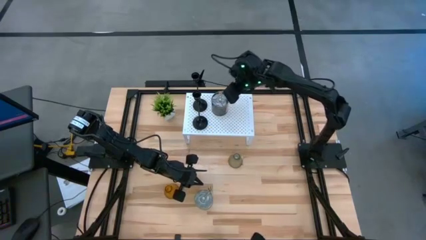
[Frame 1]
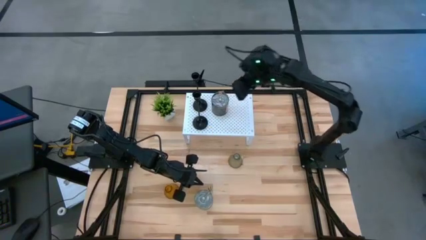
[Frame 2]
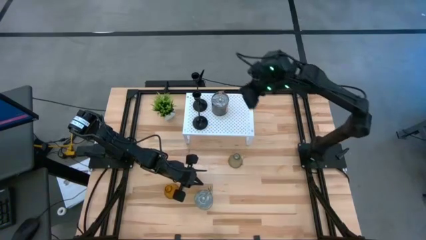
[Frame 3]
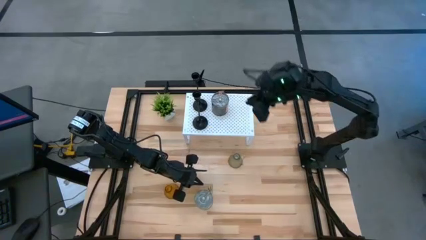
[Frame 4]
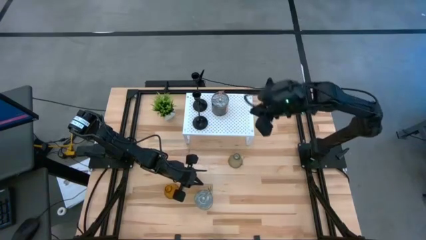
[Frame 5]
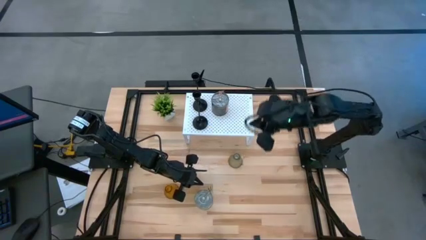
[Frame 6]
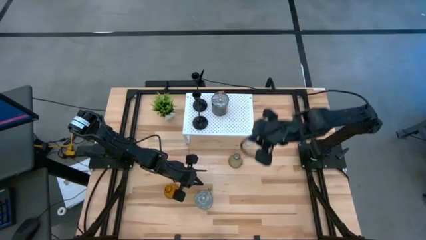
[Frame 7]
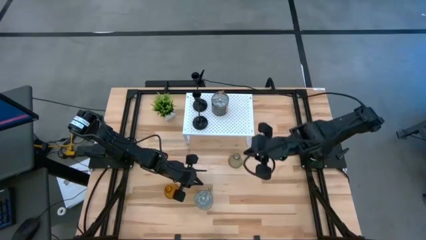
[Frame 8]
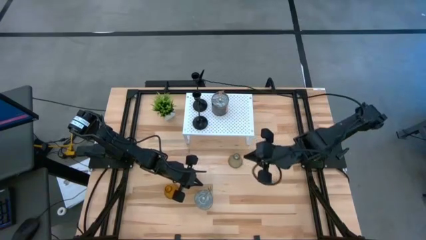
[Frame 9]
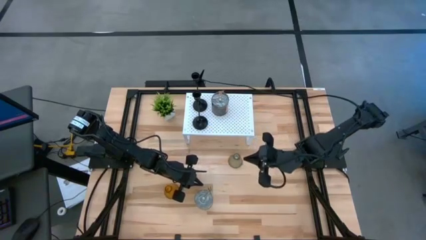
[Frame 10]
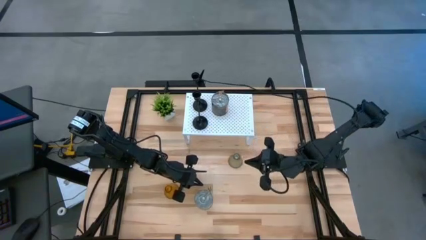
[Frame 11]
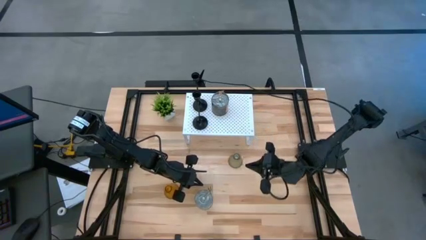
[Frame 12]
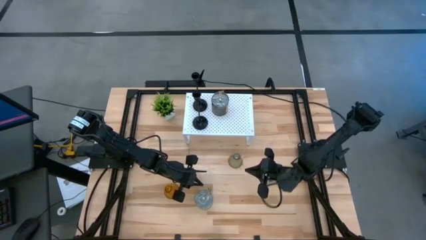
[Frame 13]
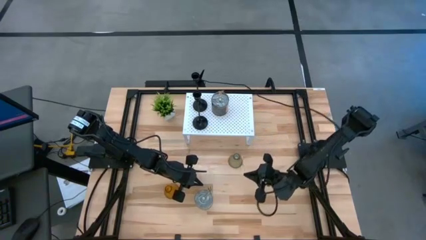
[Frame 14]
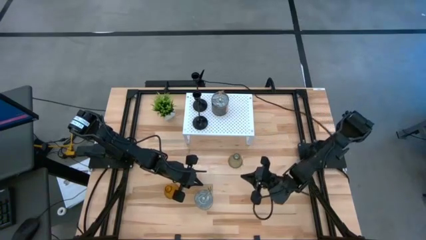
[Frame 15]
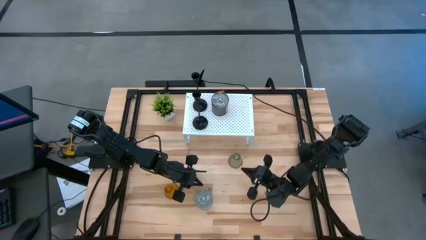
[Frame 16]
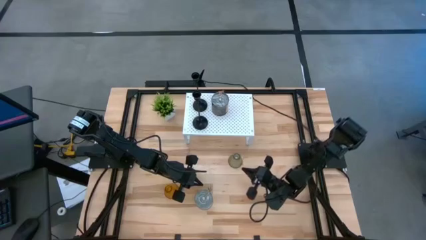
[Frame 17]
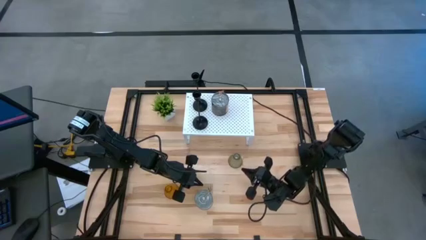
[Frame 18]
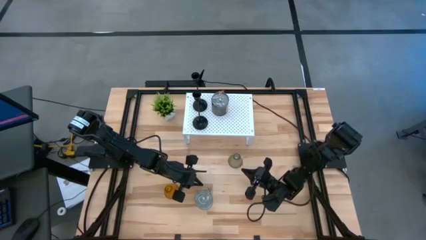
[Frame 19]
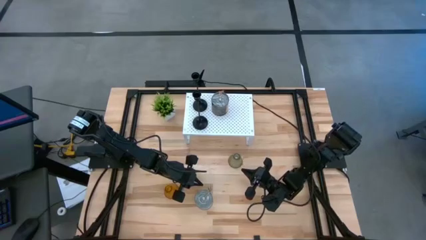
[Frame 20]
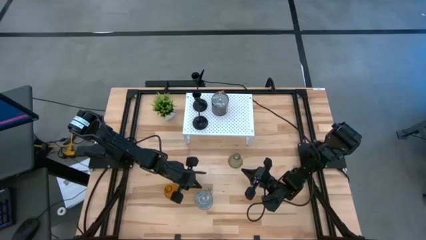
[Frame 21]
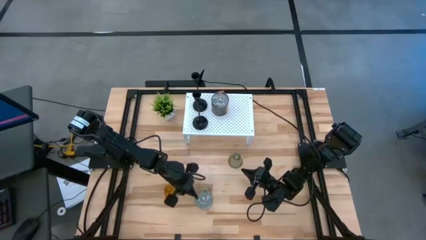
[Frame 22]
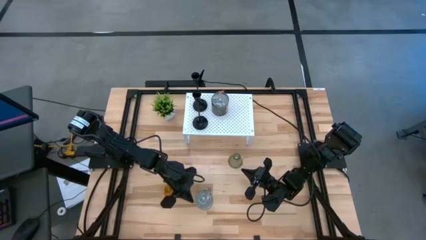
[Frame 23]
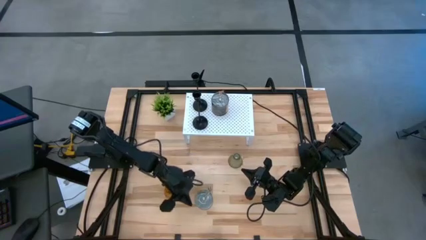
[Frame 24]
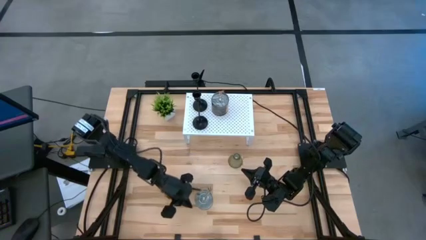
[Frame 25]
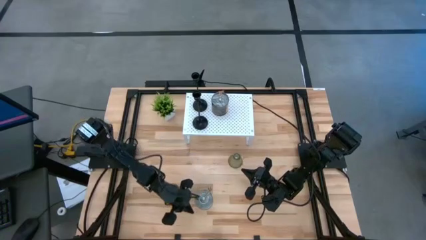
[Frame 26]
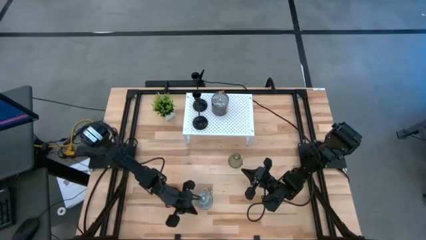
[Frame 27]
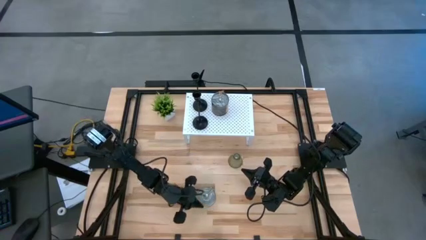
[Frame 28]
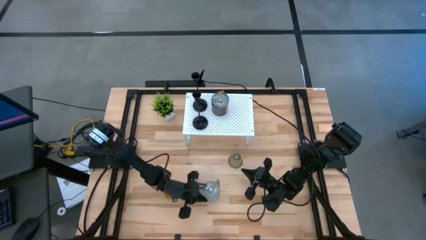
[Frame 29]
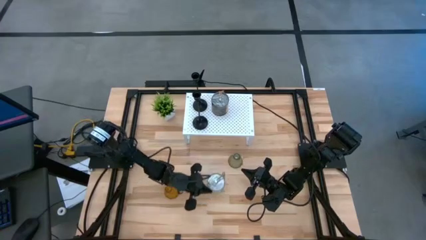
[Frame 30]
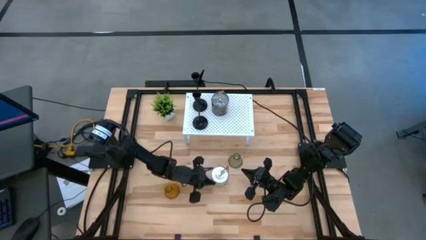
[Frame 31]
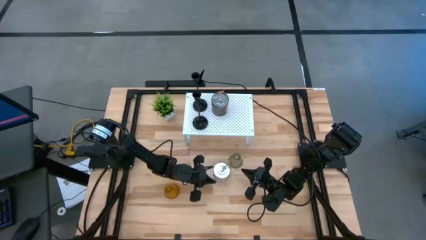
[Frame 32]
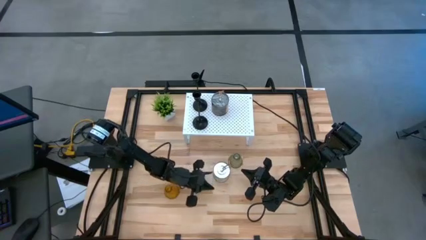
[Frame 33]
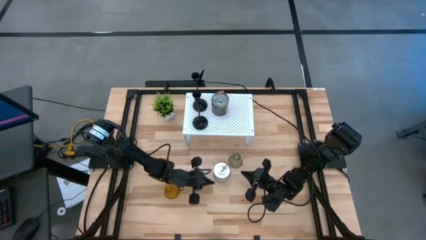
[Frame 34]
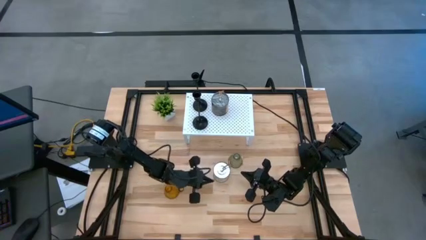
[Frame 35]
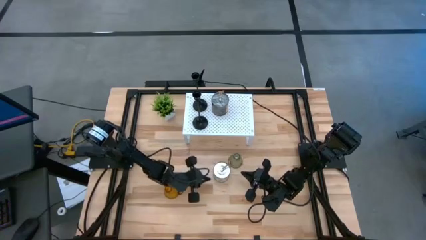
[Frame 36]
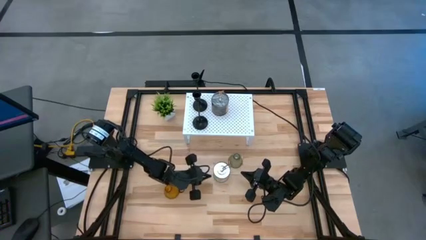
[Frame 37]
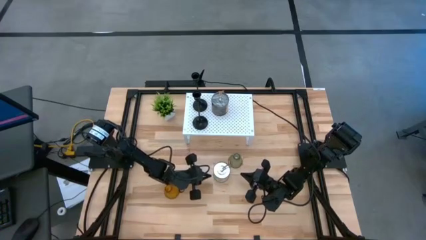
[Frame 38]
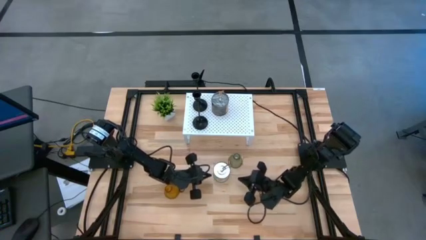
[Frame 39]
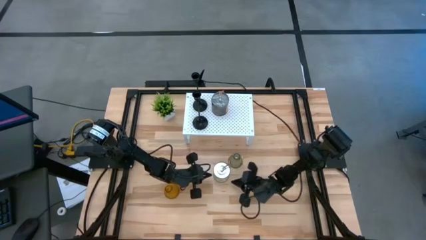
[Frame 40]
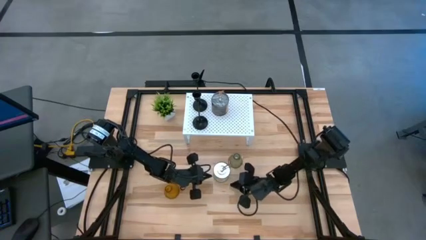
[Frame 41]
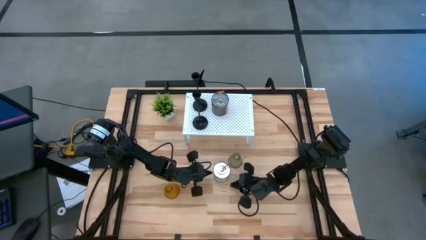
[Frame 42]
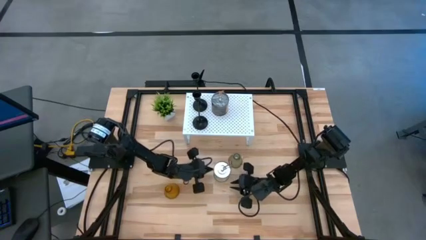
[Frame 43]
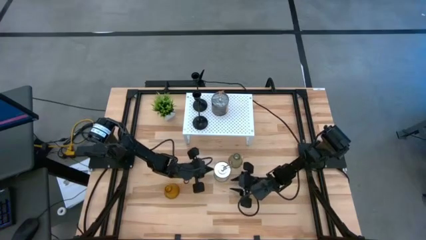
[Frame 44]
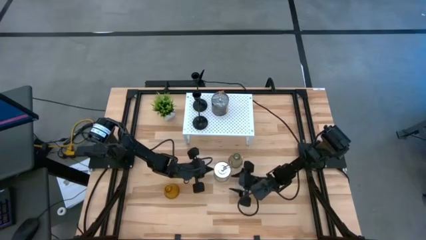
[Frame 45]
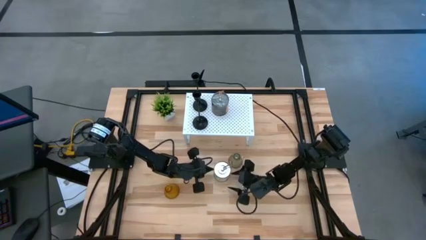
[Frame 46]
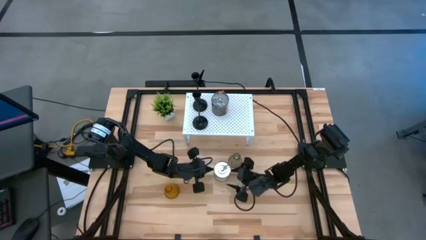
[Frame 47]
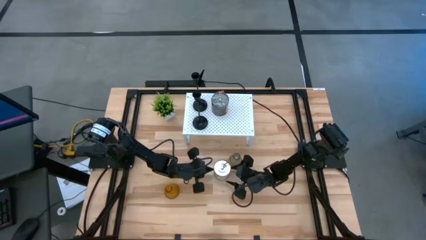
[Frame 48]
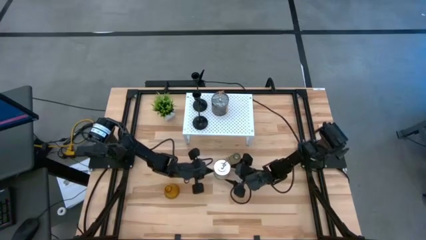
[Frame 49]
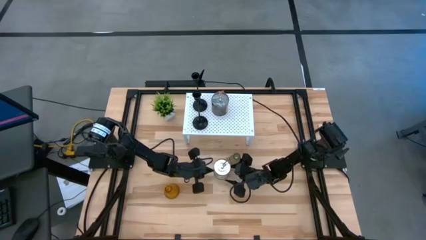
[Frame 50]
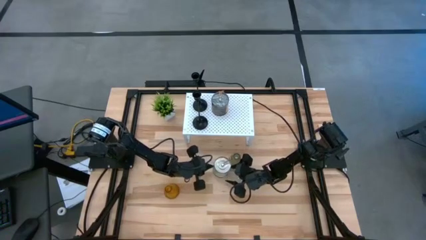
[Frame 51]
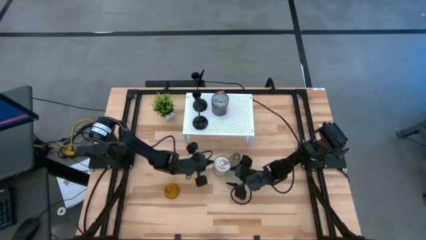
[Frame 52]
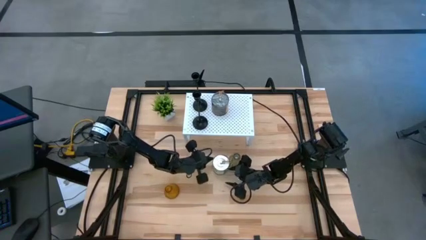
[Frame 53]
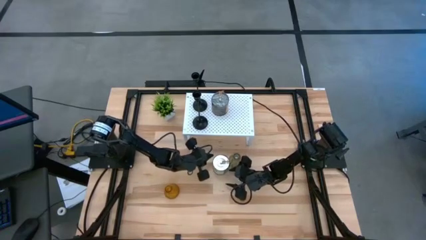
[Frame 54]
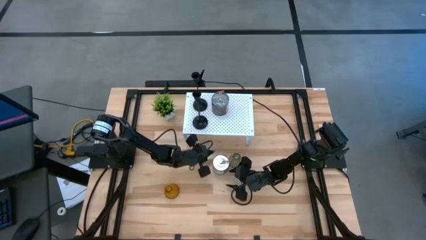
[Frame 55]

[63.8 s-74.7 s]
Task: Pick & Place candle stick holders
Align the silver scented candle can with the other silver scented candle on the shelf

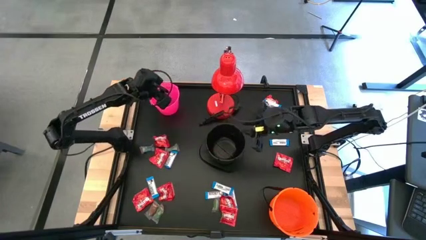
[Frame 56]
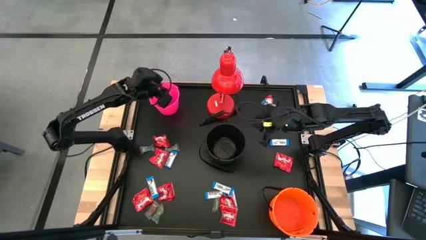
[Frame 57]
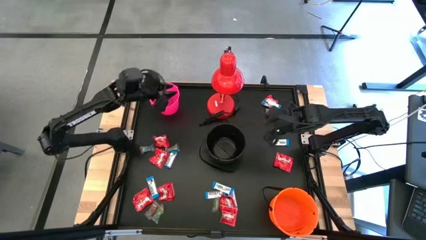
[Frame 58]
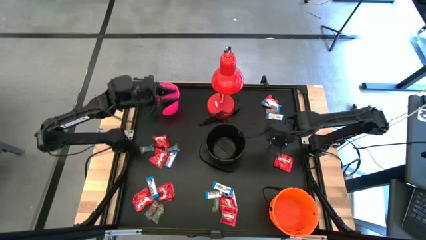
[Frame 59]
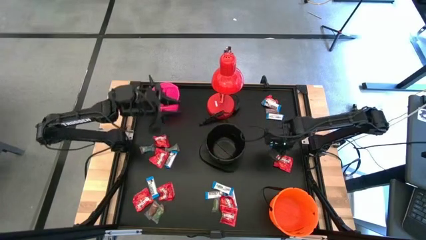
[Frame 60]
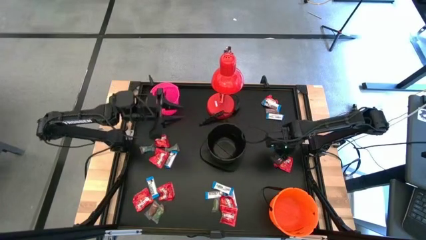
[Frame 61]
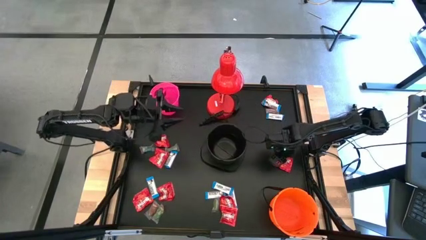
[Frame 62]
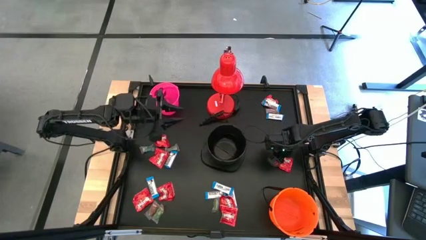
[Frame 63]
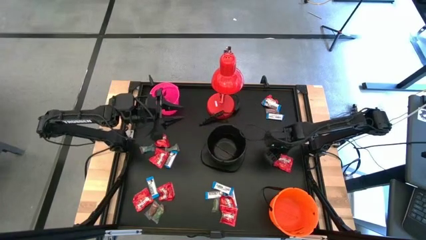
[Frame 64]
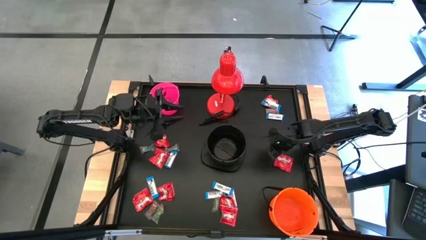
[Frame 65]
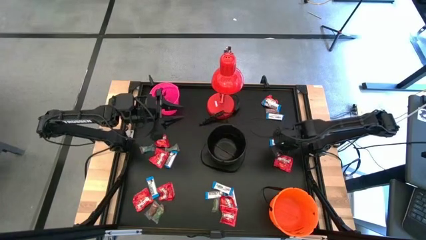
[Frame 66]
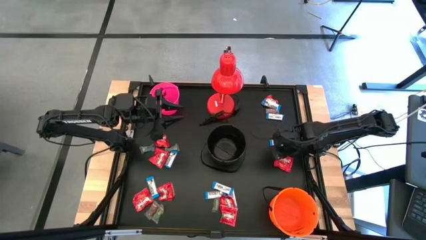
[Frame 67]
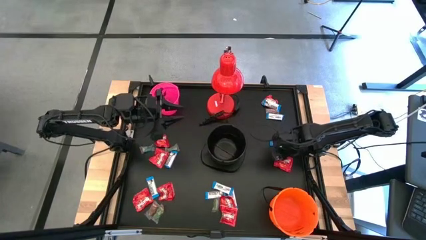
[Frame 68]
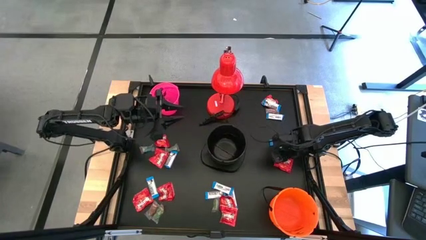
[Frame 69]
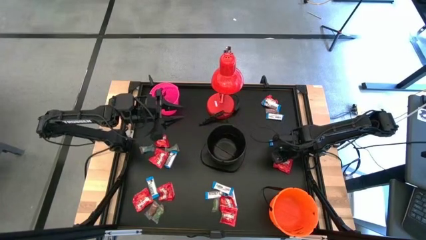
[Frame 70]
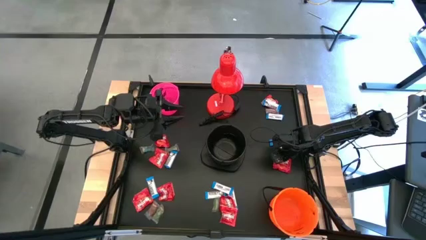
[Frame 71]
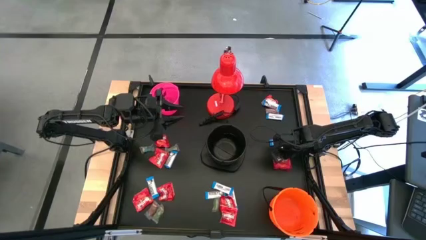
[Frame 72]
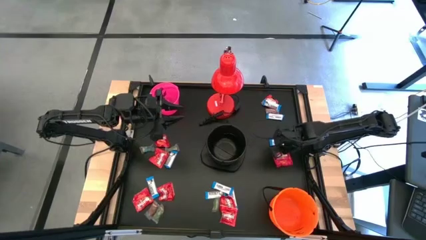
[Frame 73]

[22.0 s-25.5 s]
Task: Organize candy in baskets
Put the red candy into the black bucket

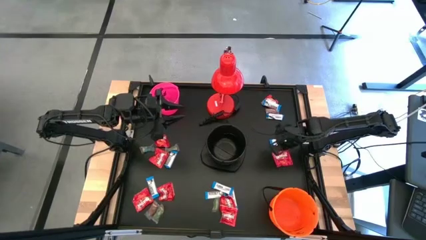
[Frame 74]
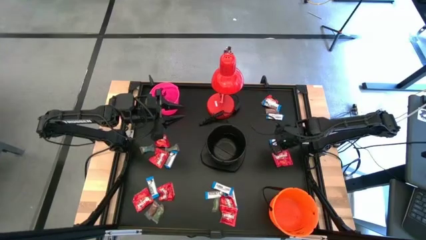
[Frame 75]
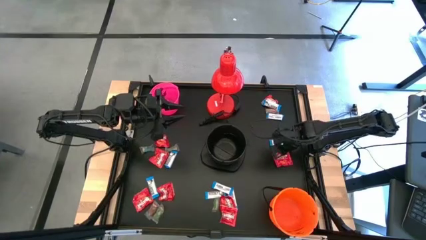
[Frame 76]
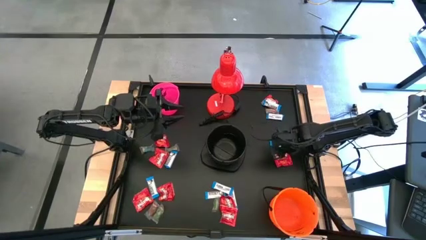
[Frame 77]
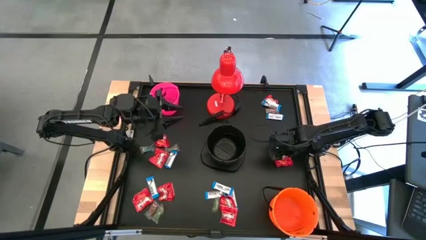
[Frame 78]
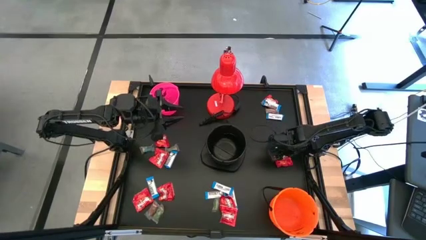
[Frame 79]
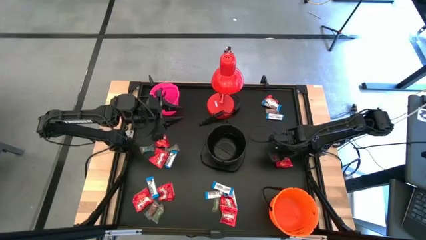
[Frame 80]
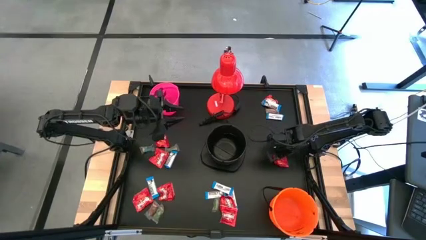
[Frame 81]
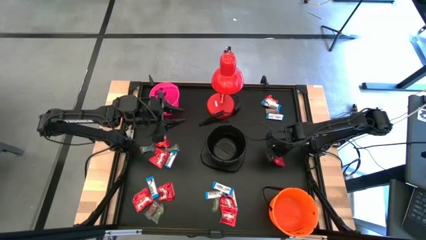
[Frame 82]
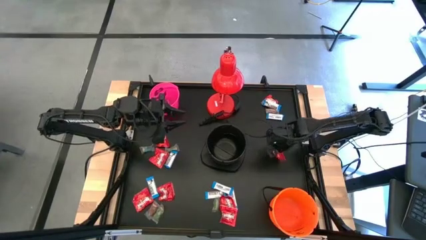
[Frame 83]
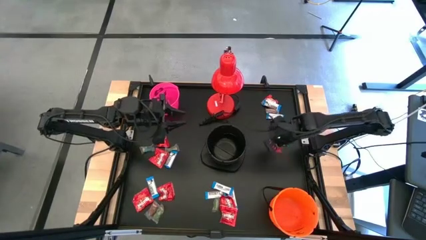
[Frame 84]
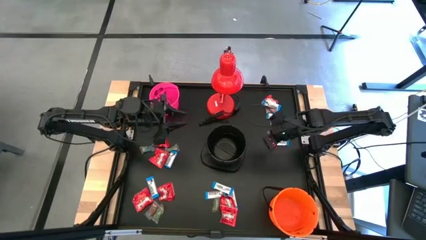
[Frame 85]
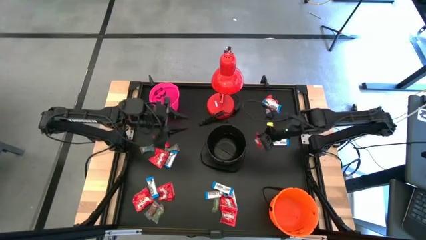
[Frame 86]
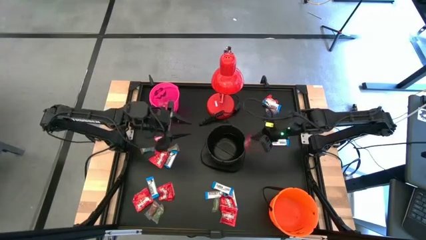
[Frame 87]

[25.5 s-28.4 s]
Put the red candy into the black bucket
